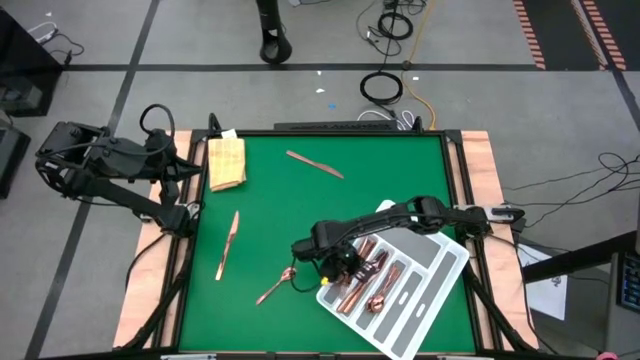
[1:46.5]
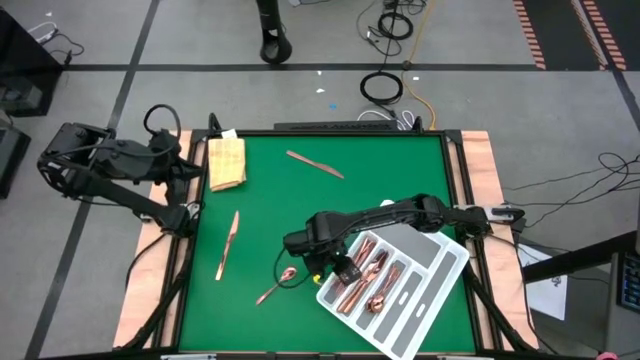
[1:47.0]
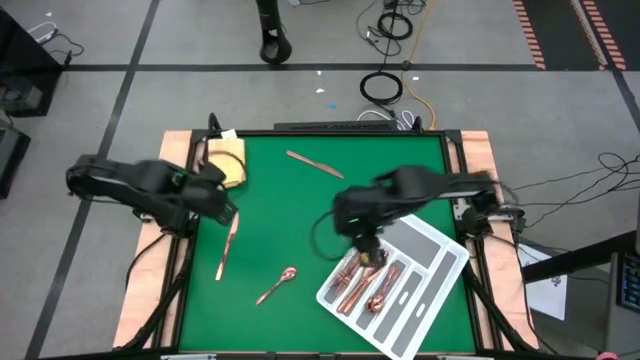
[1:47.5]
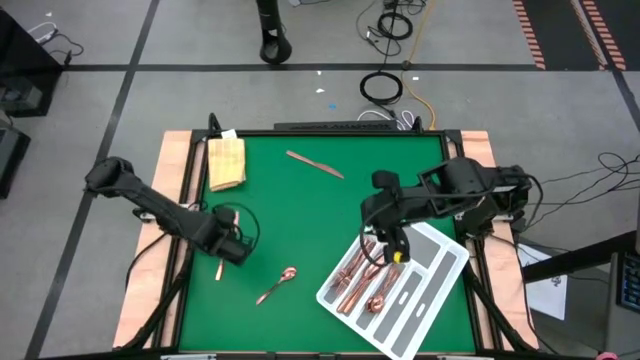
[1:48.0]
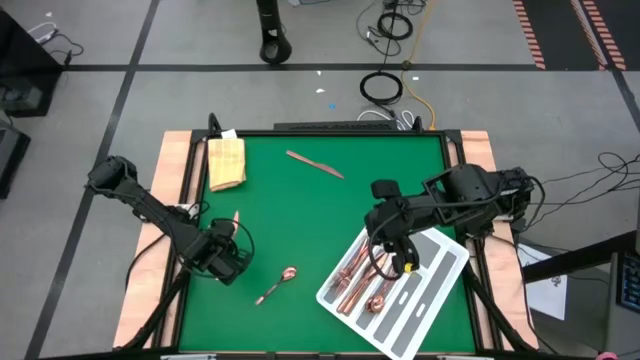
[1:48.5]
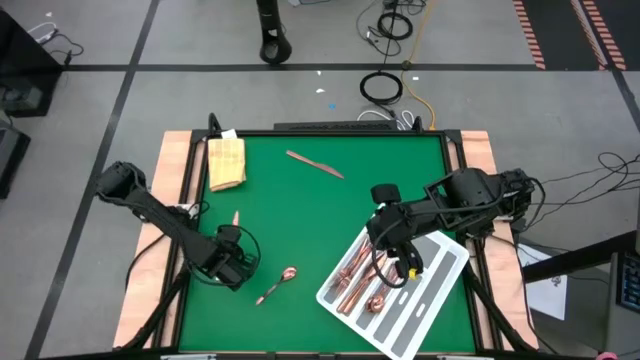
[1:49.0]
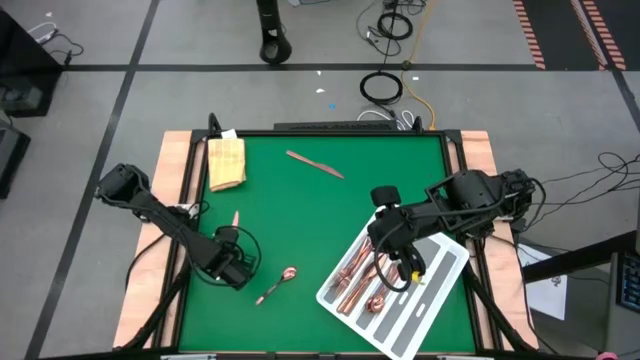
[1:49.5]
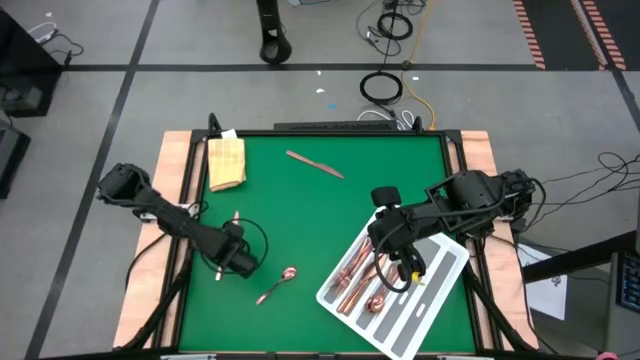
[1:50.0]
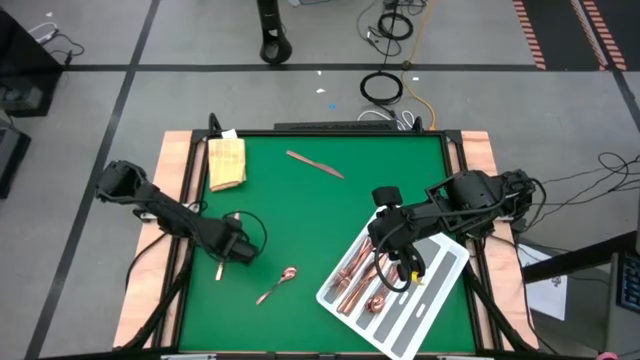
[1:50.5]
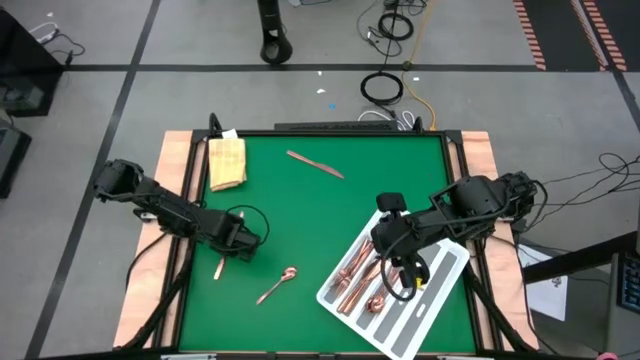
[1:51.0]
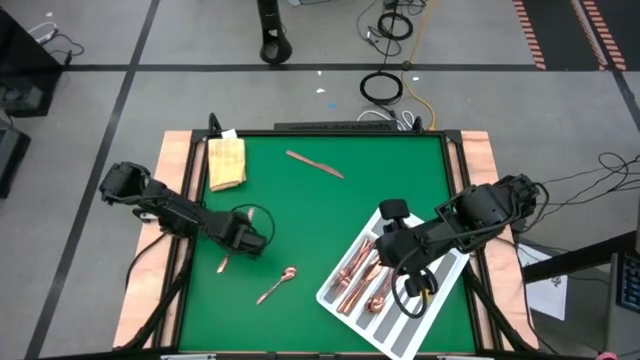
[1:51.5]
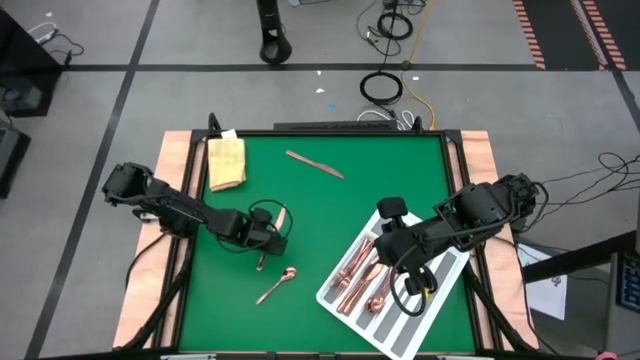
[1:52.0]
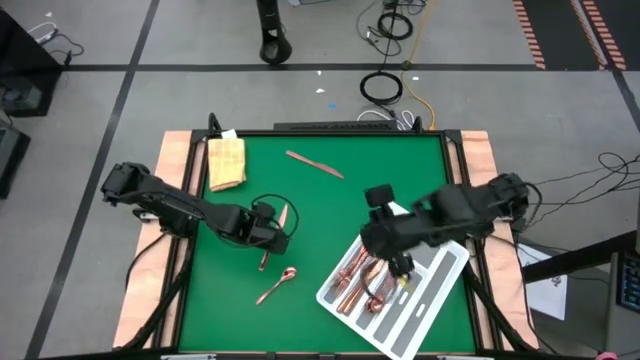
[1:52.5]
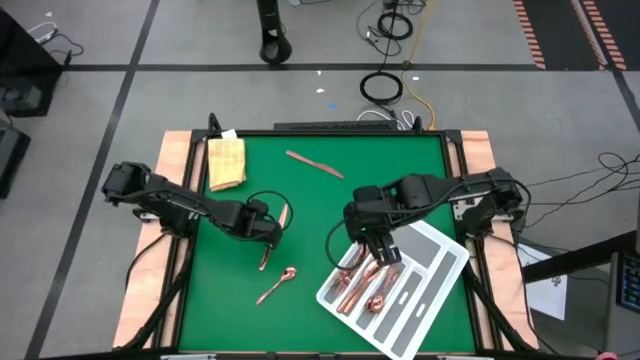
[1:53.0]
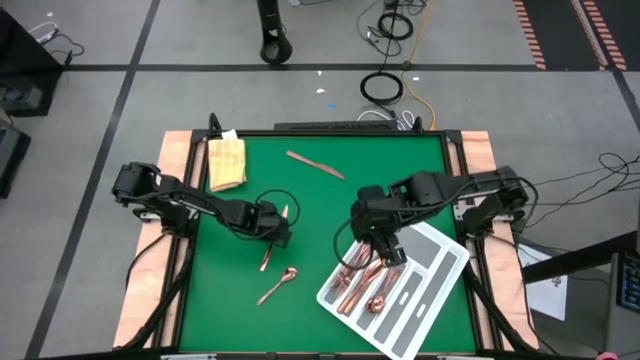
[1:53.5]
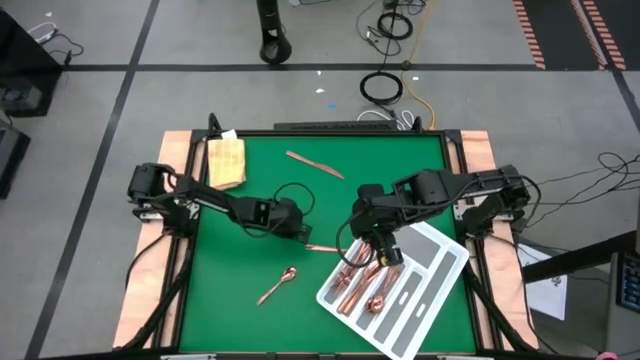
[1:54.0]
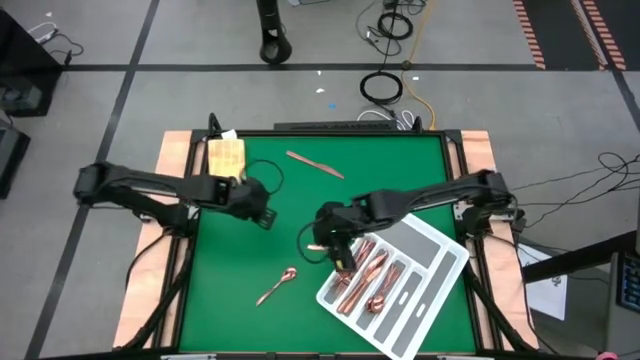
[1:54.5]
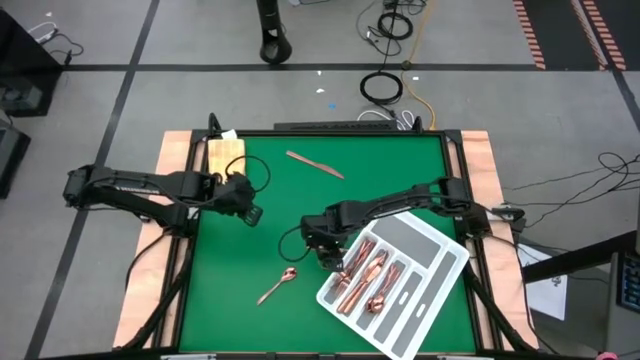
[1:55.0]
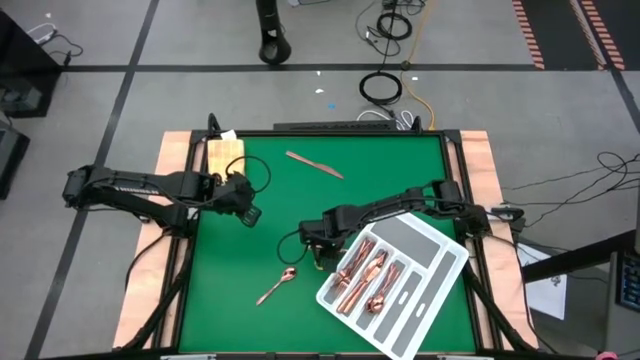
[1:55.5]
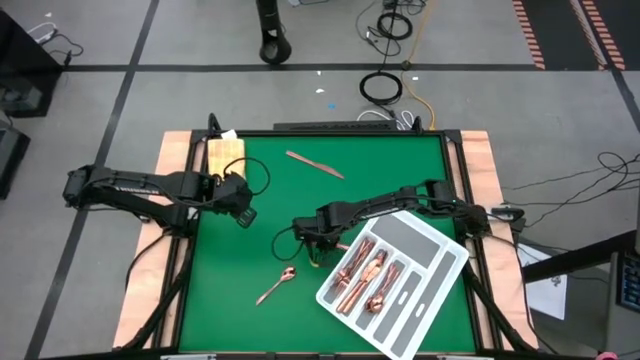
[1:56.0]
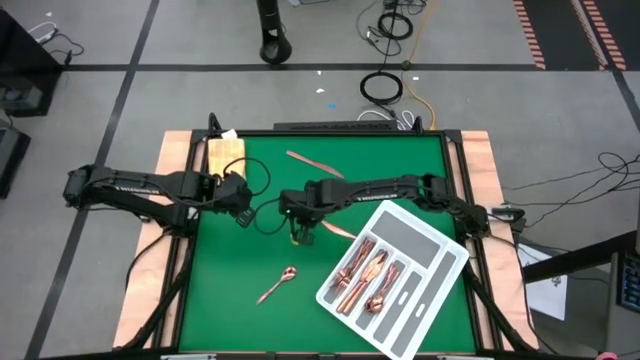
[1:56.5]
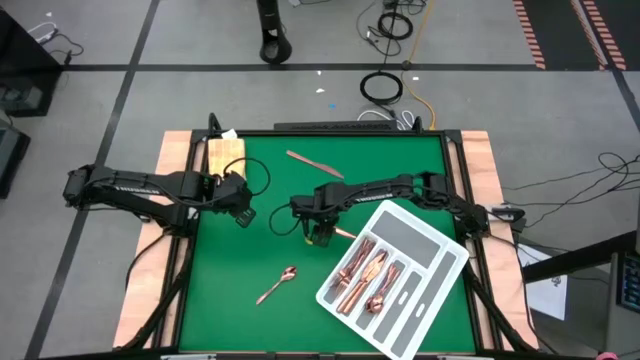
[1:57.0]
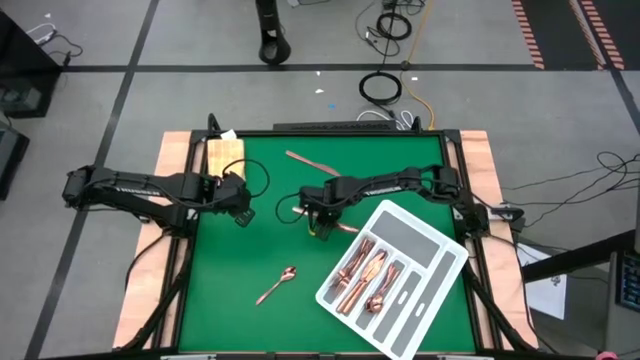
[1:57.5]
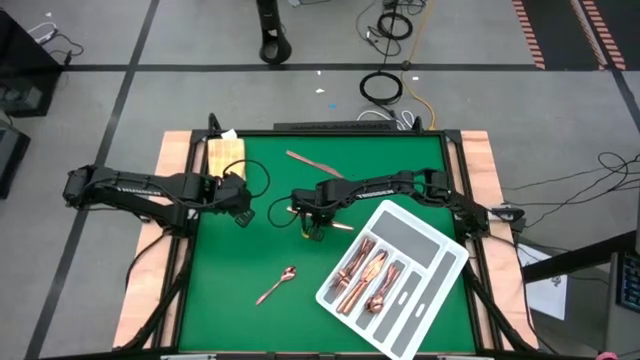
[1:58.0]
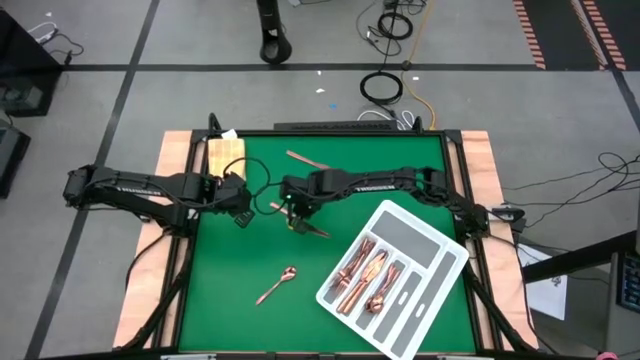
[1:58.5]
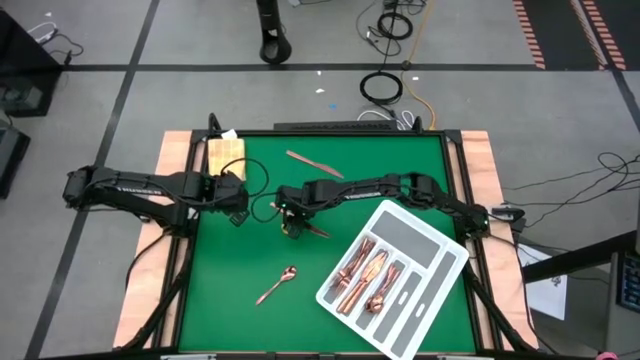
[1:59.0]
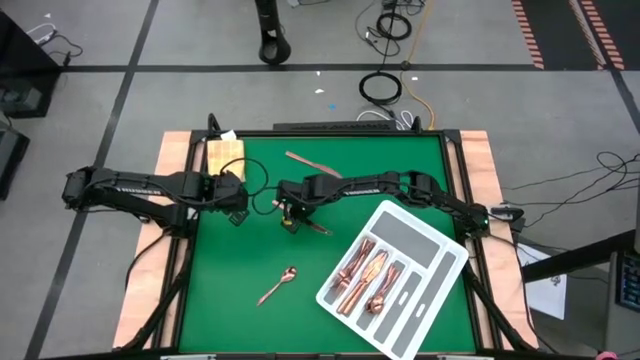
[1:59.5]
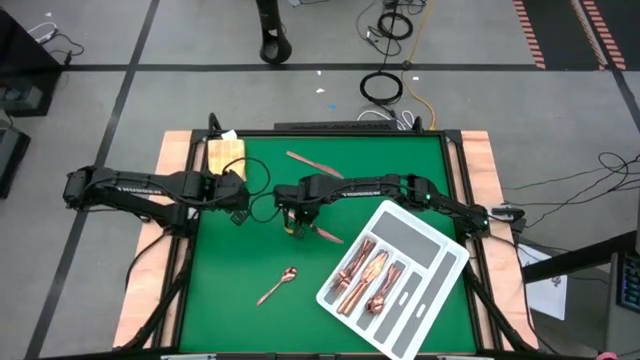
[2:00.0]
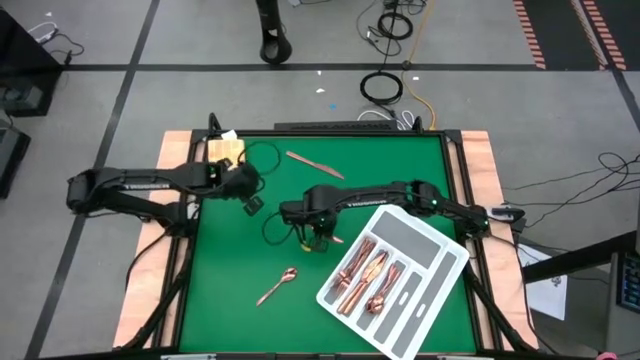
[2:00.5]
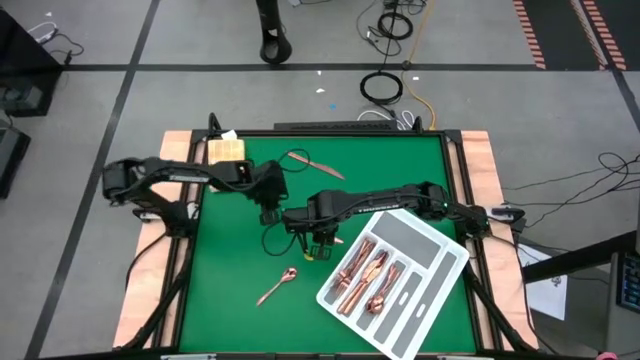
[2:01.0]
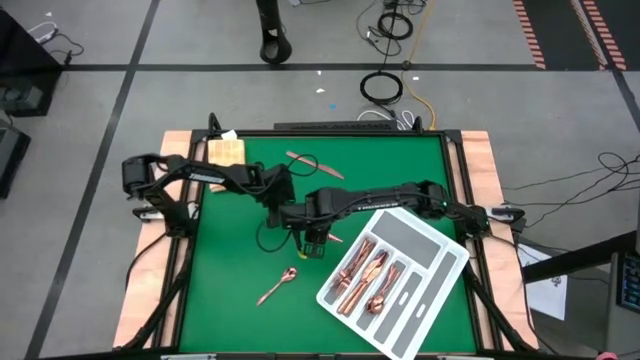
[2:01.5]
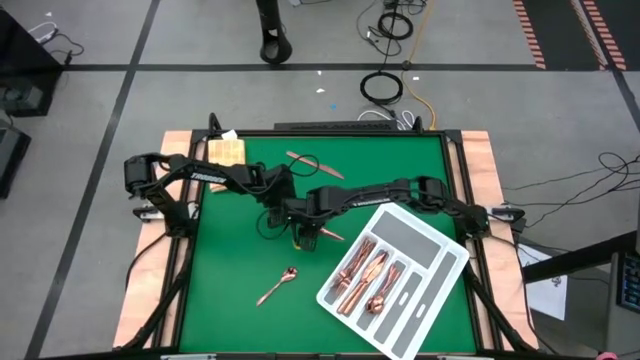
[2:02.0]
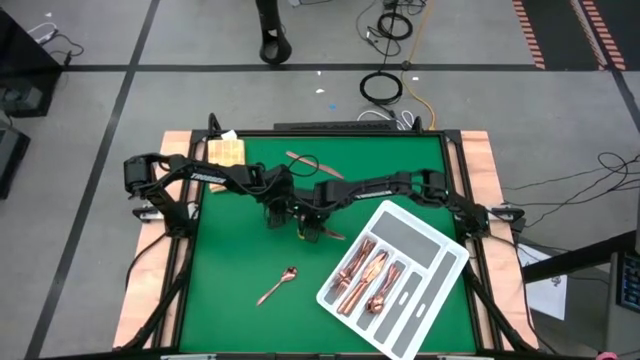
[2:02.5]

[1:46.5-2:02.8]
Task: Sort silverware
Put the bronze knife into the silverware tray

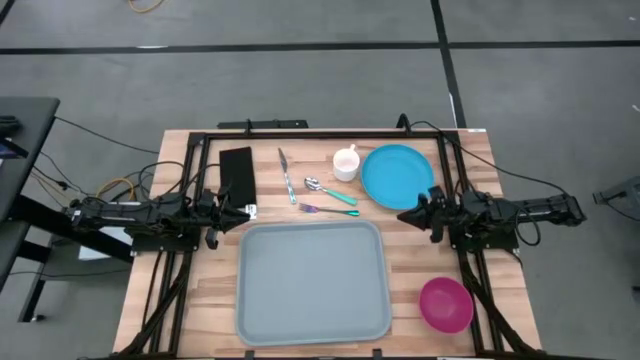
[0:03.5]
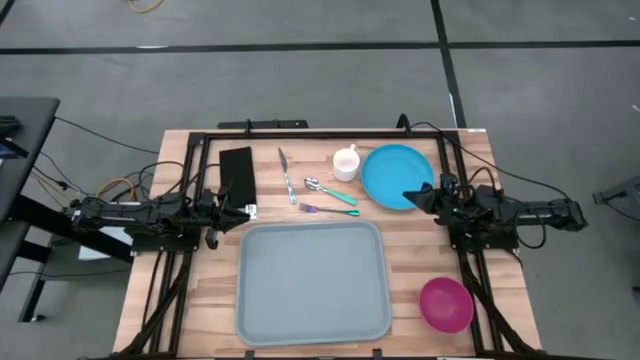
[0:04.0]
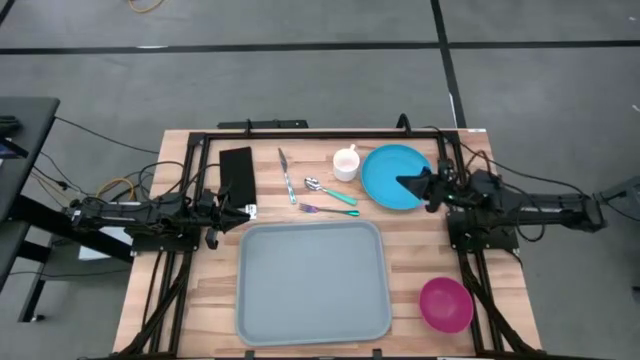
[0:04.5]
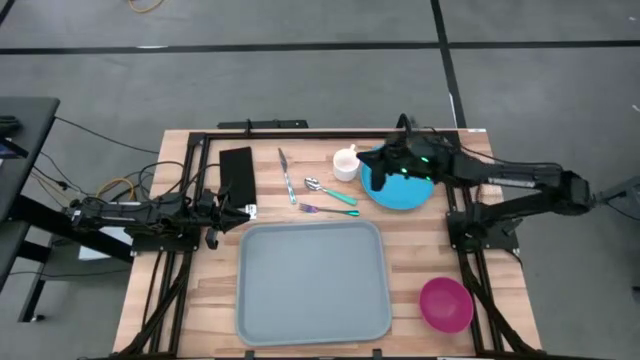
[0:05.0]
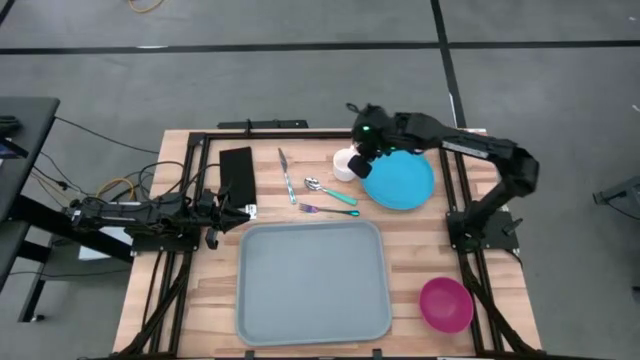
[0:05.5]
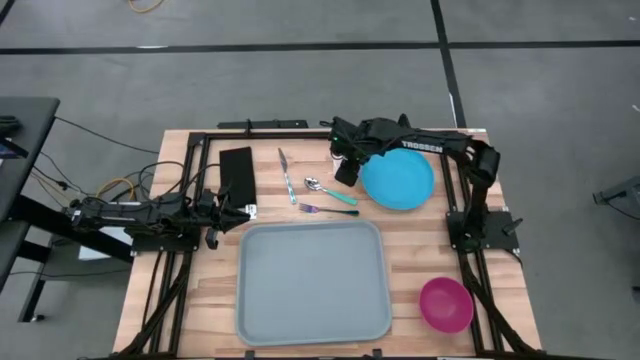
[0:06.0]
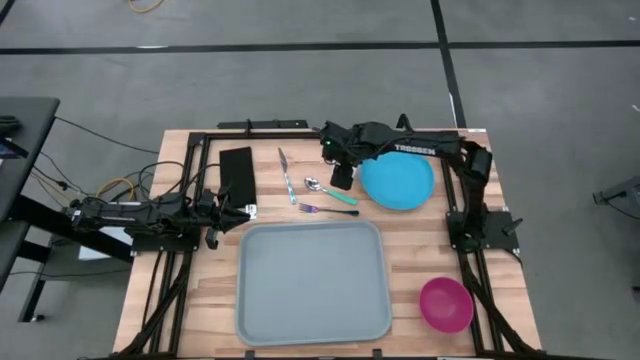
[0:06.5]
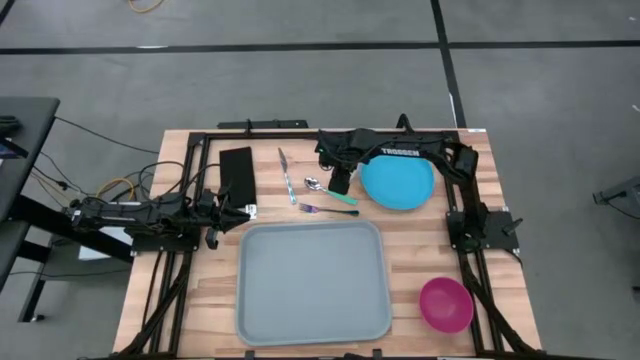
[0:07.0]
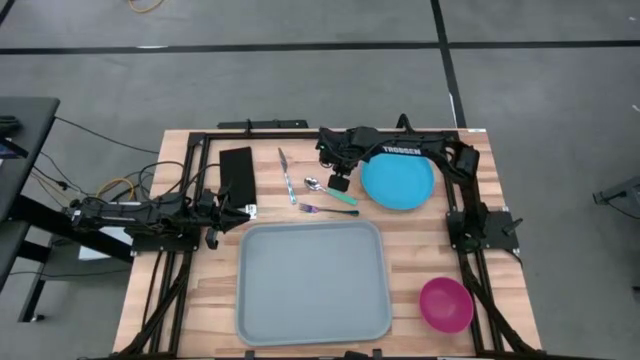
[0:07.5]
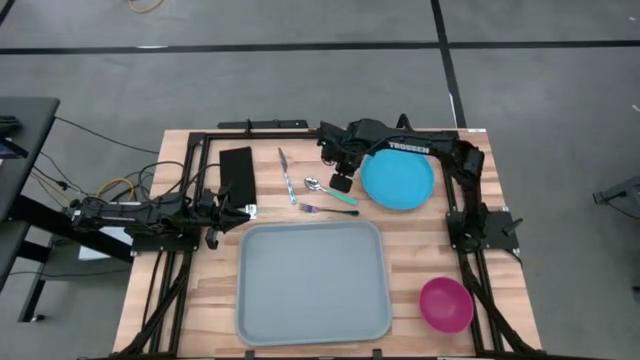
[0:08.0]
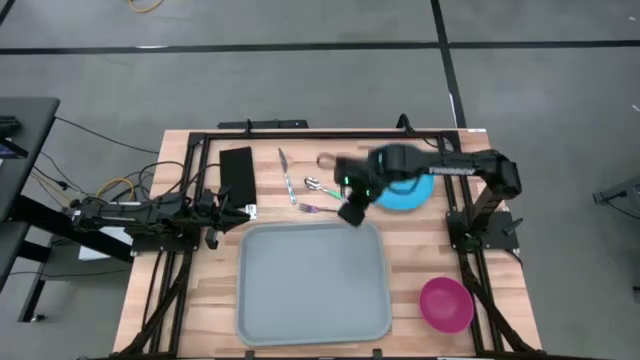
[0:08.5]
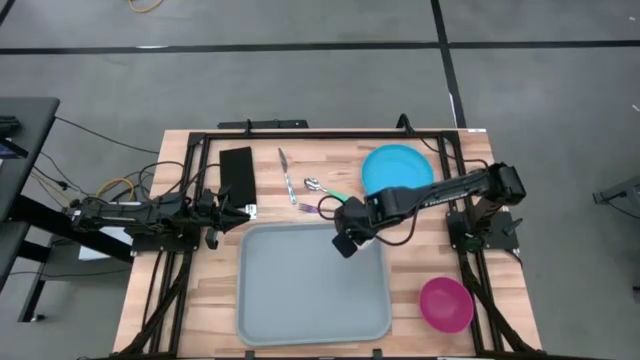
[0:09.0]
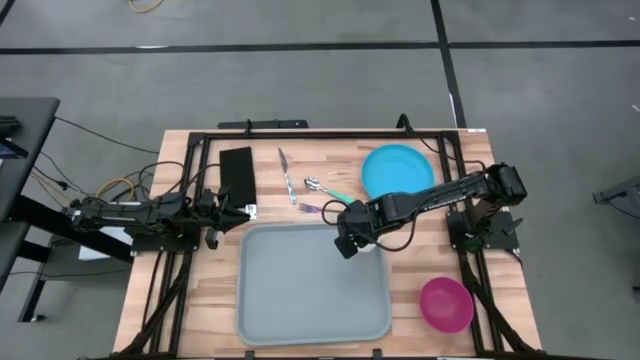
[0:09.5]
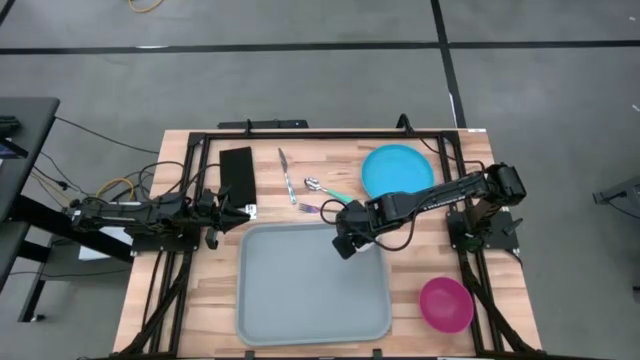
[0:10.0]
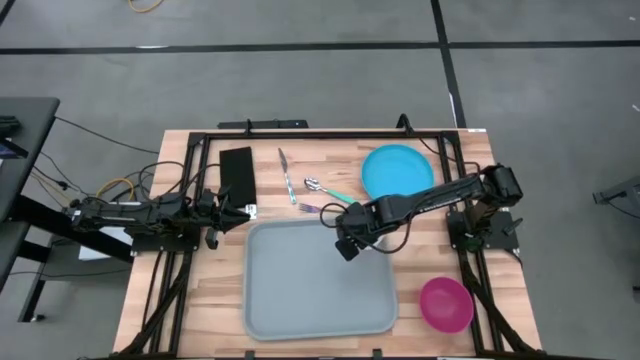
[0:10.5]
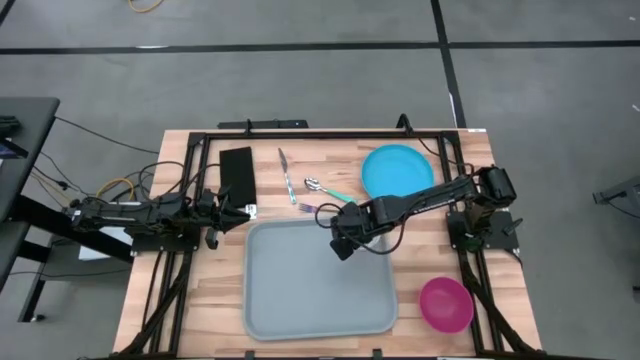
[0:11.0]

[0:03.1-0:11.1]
Task: Set up tray
Put the white mug on the top right of the gray serving tray
